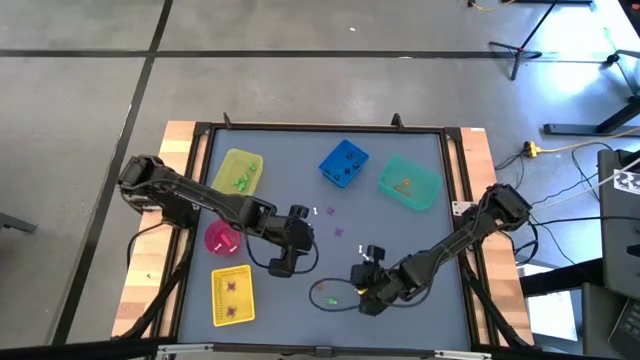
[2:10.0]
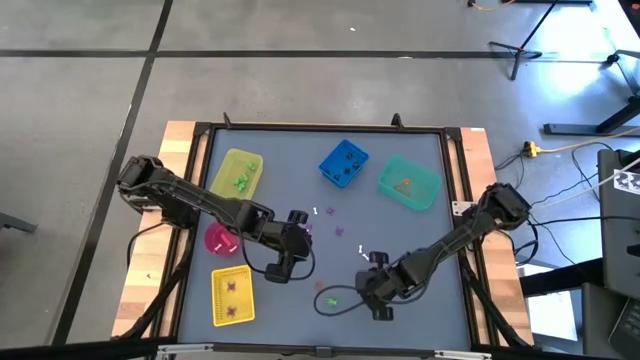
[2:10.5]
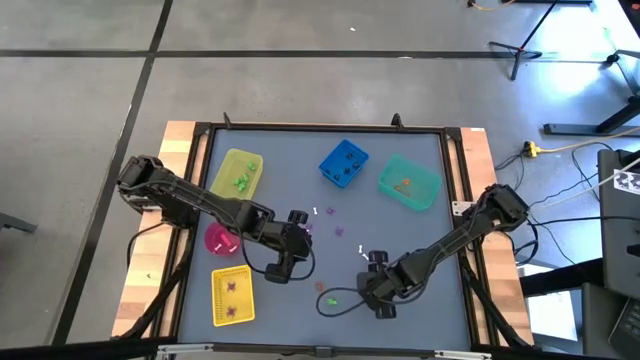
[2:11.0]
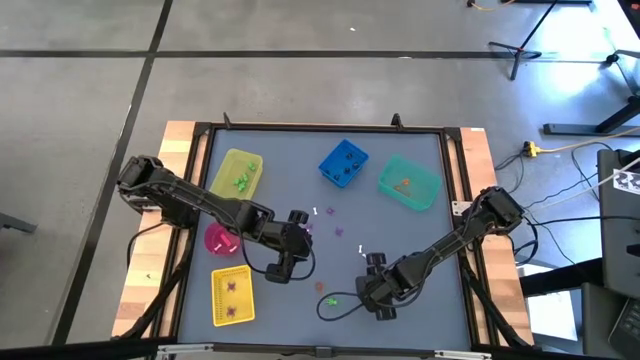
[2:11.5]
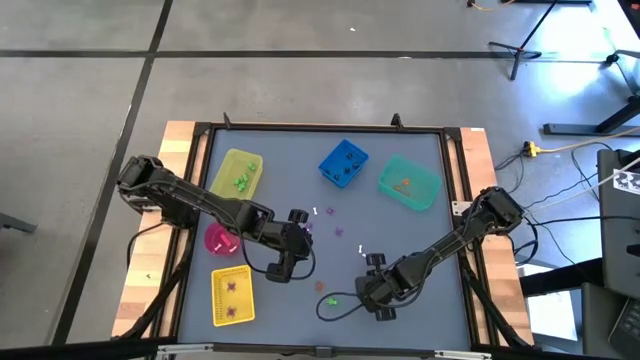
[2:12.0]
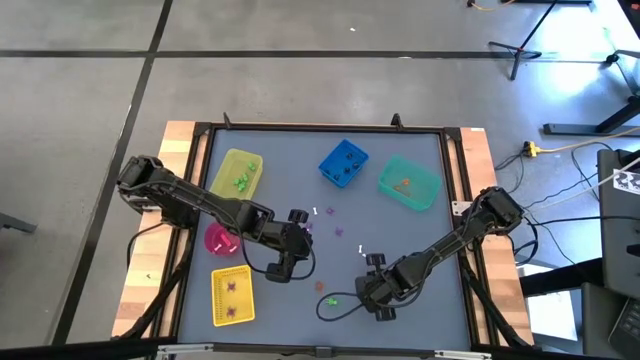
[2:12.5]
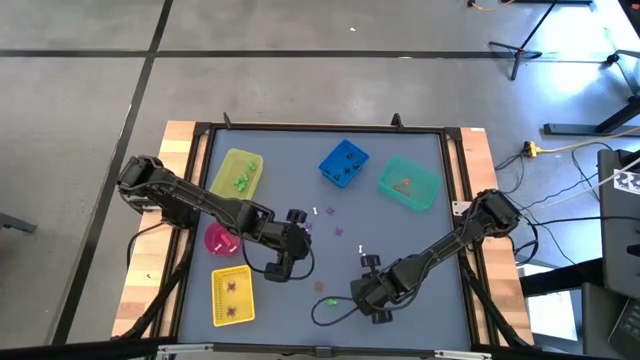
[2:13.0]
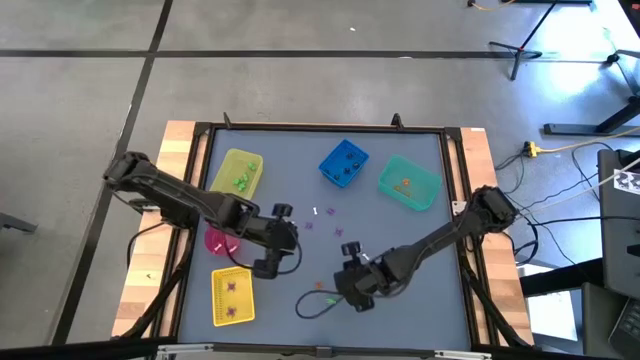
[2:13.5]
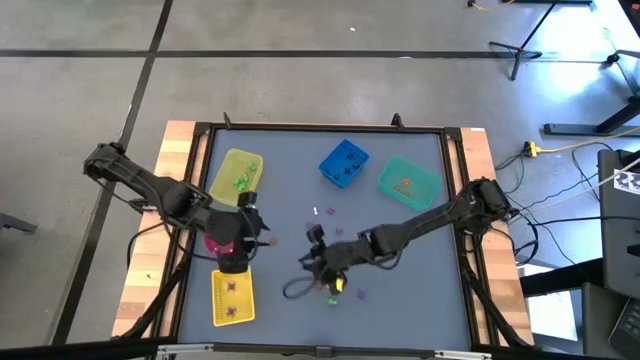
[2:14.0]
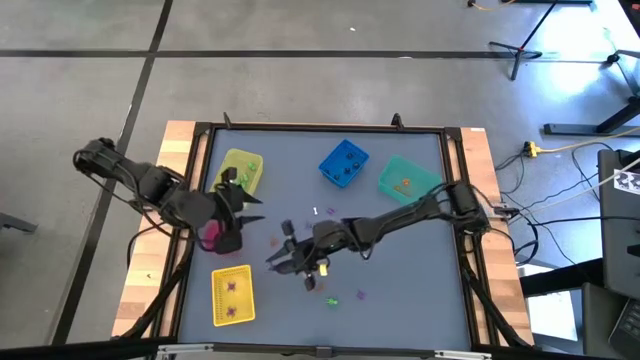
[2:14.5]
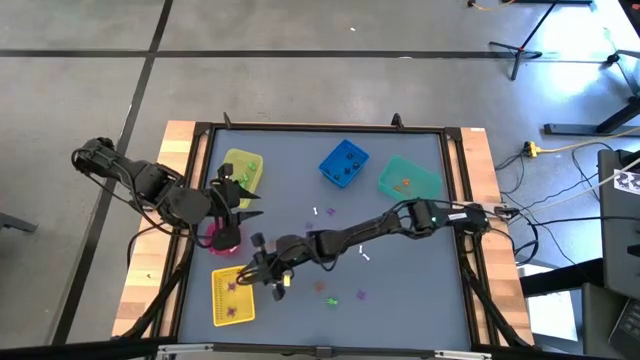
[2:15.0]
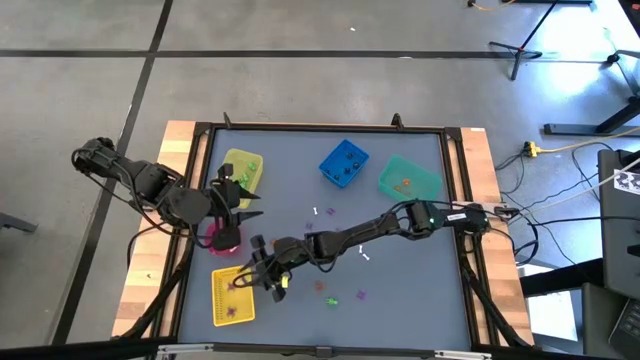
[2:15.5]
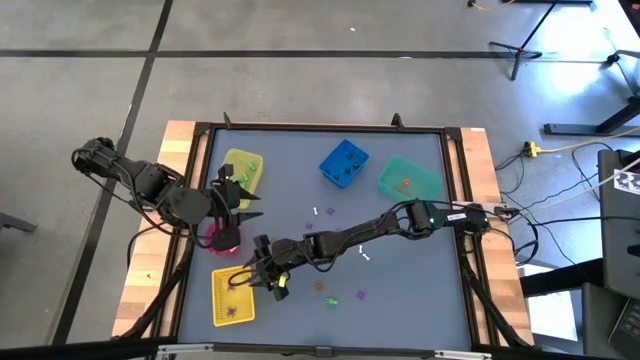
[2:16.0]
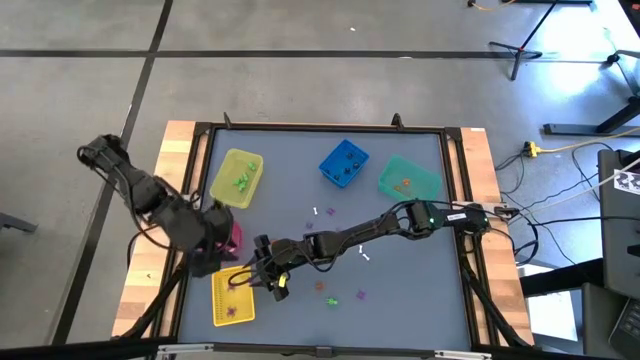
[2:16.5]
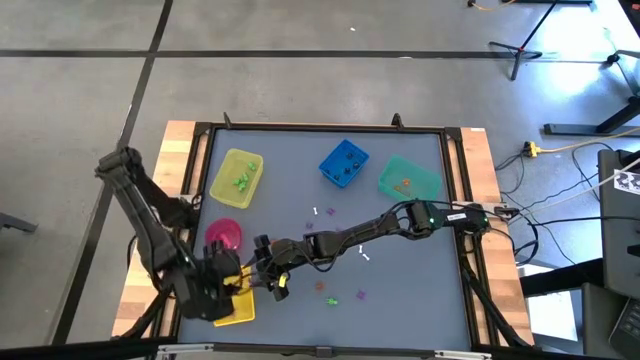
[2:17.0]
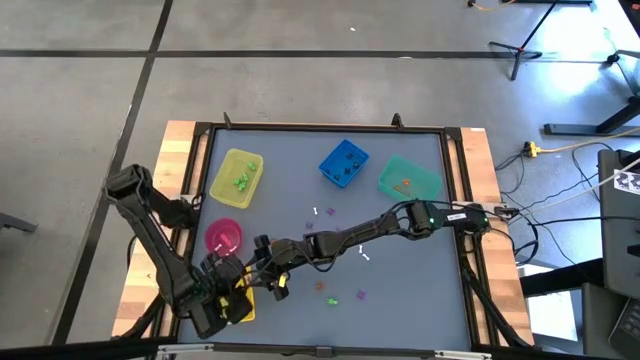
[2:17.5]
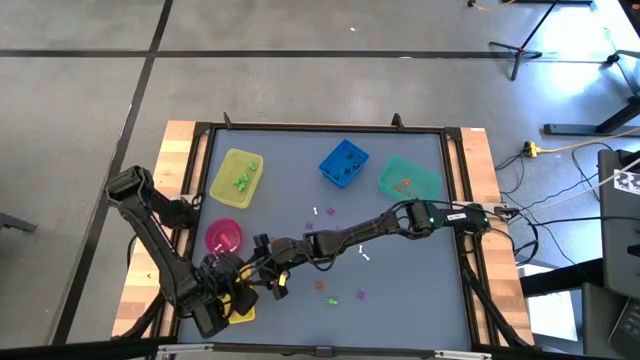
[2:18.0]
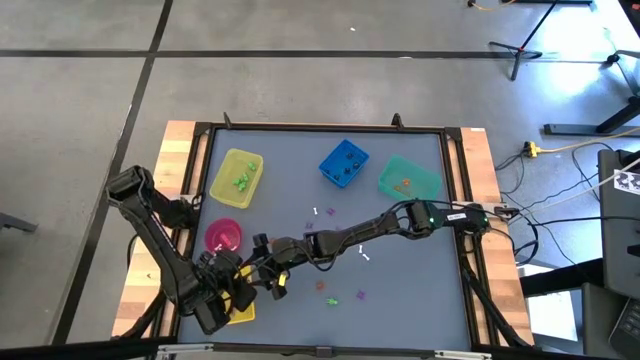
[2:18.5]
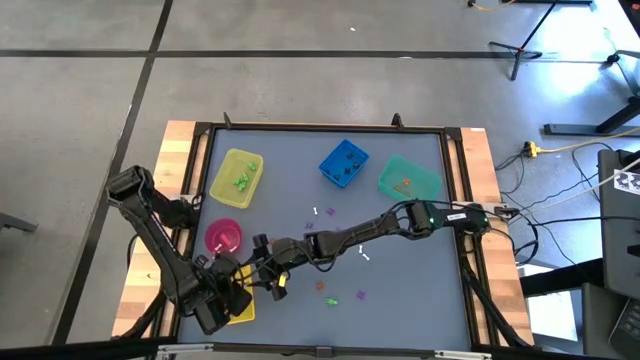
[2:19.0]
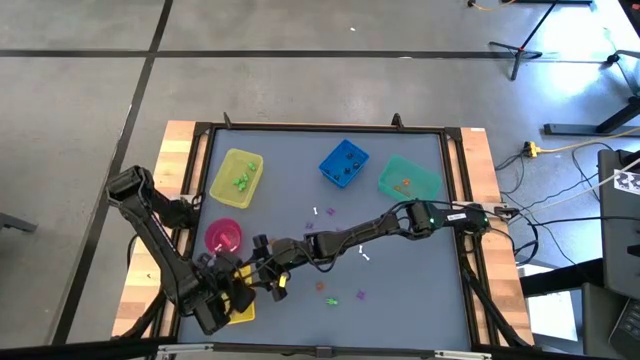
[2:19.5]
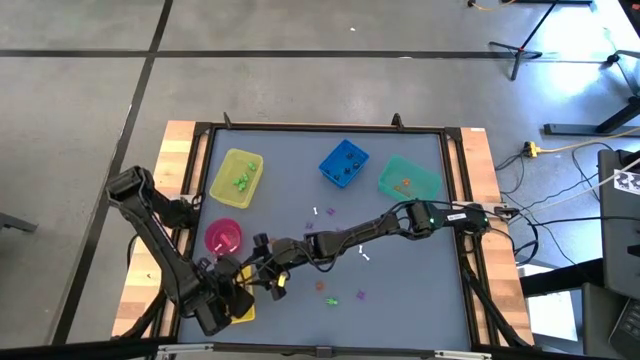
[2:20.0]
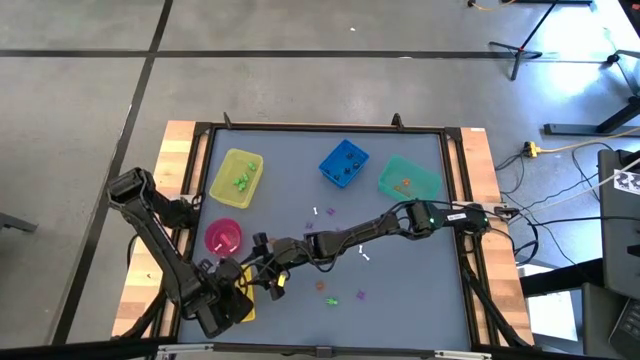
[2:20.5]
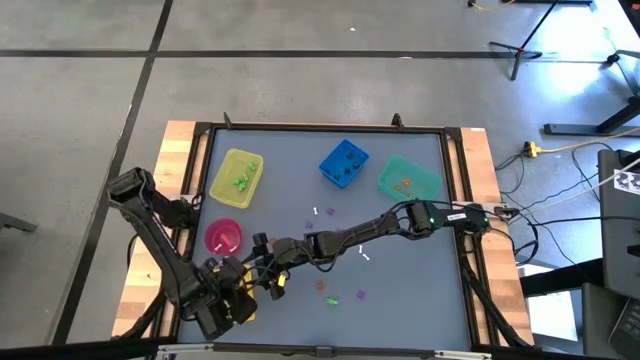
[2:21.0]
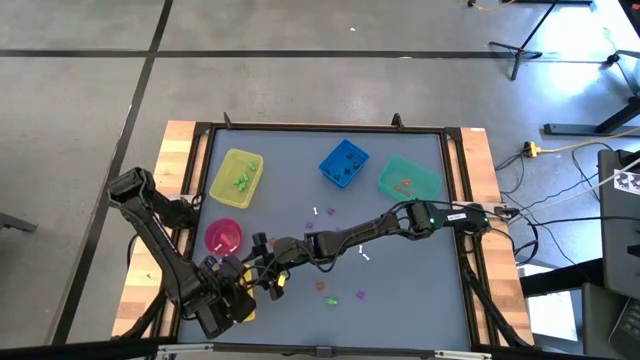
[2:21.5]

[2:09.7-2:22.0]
Task: Sort Halloween decoration
Put the purple spider toy into the yellow basket

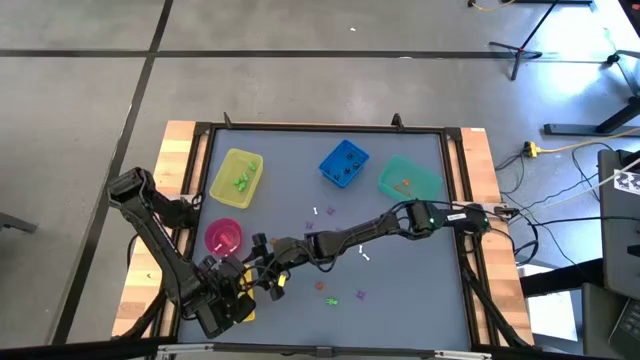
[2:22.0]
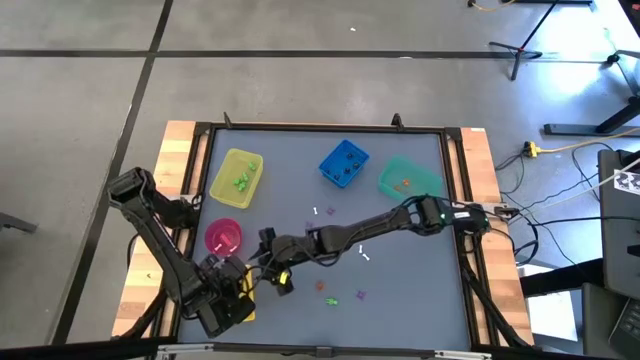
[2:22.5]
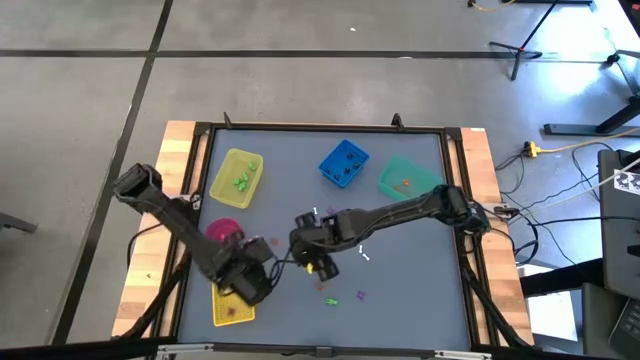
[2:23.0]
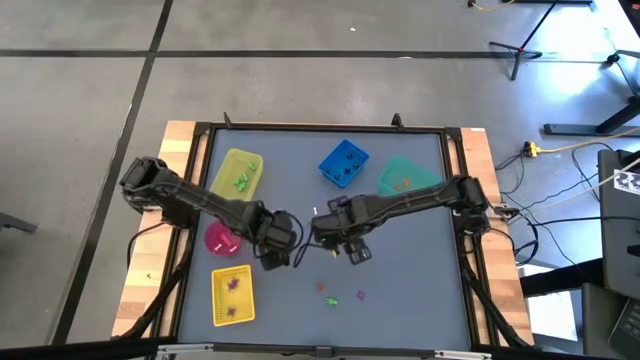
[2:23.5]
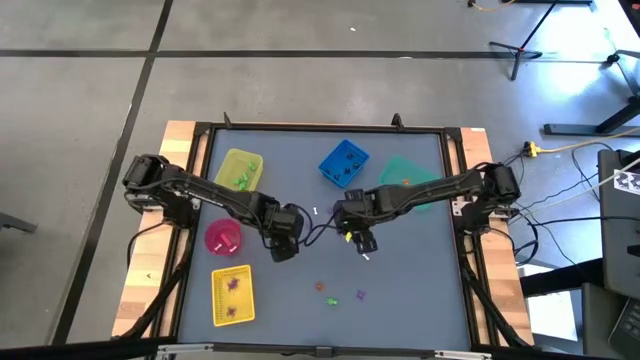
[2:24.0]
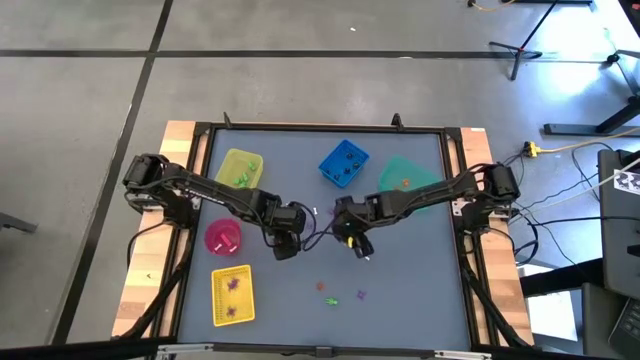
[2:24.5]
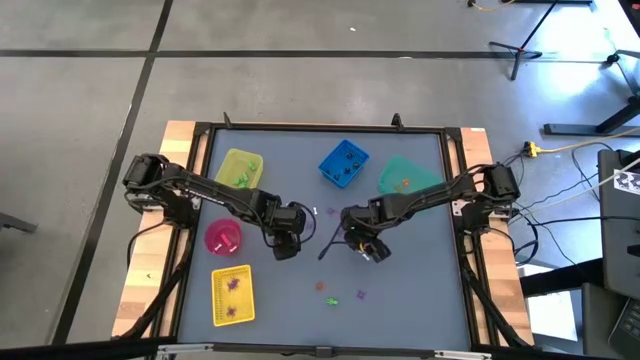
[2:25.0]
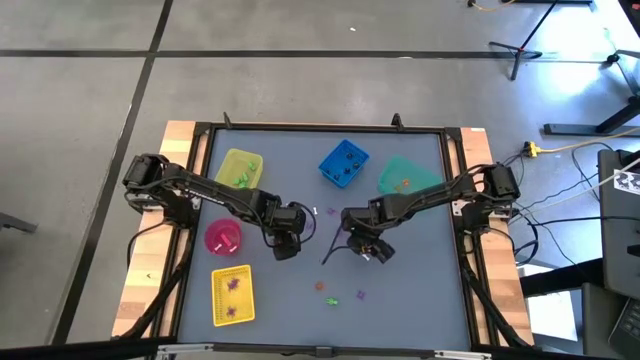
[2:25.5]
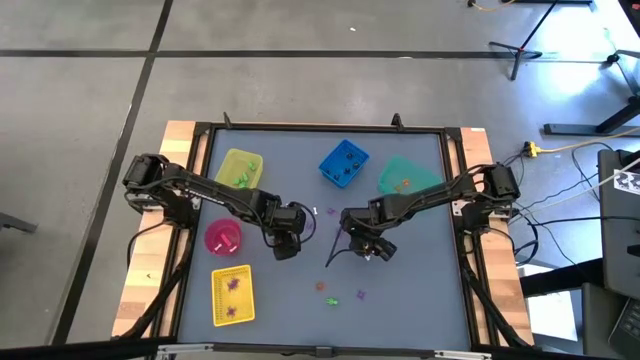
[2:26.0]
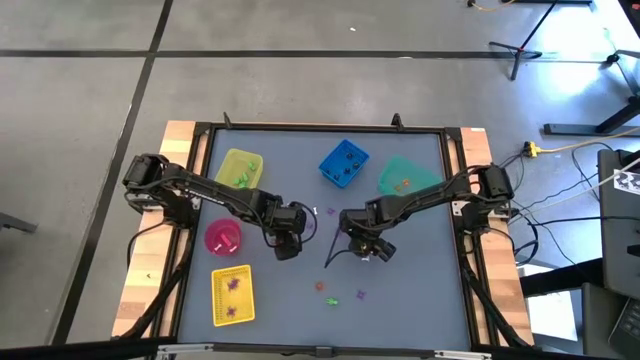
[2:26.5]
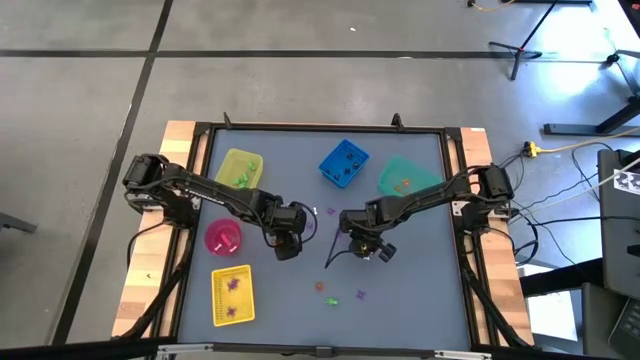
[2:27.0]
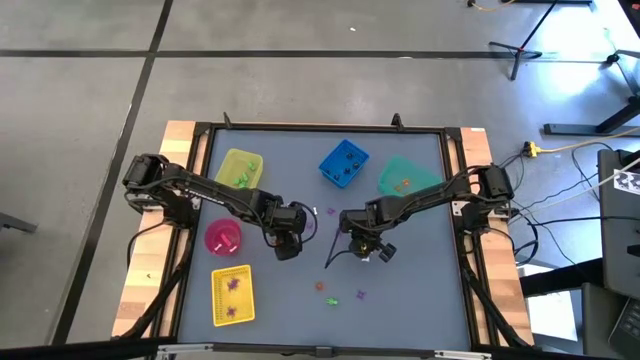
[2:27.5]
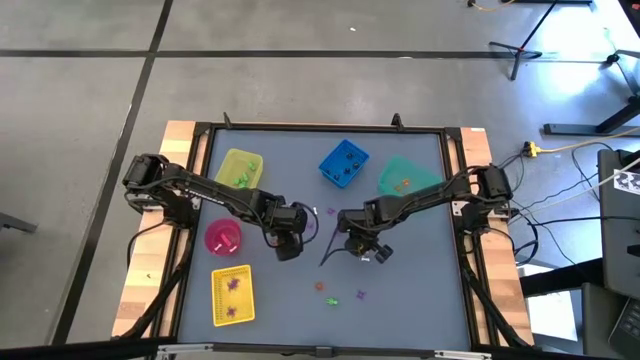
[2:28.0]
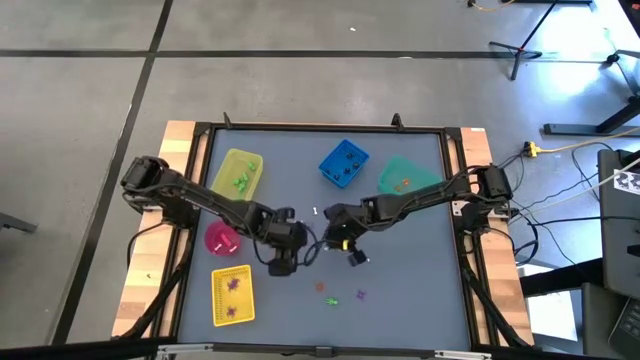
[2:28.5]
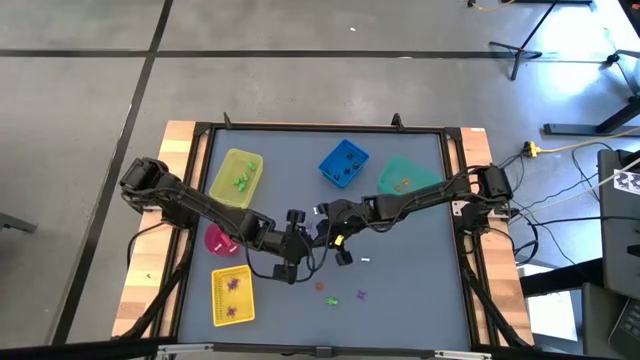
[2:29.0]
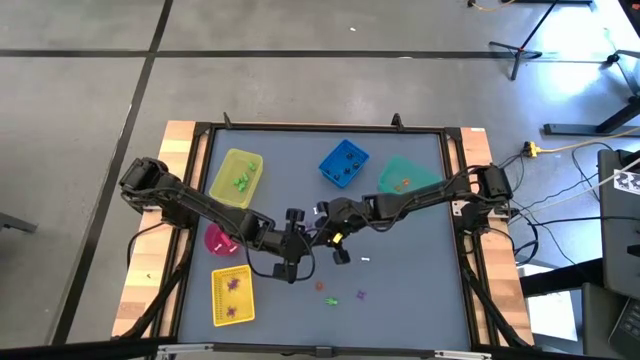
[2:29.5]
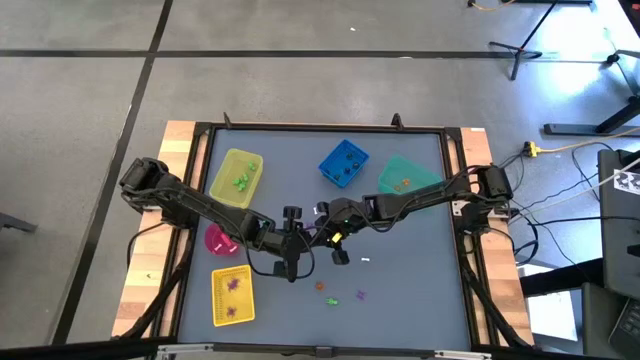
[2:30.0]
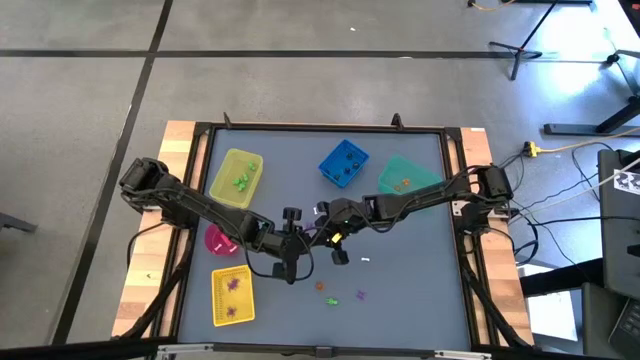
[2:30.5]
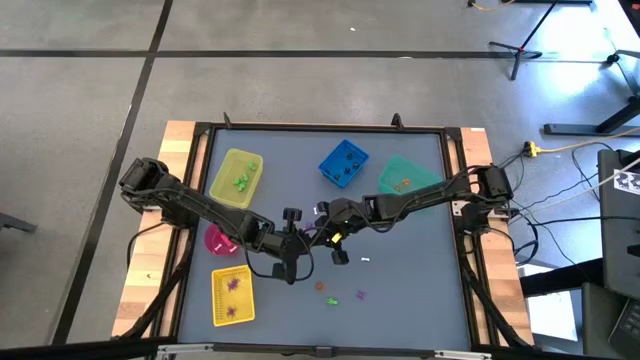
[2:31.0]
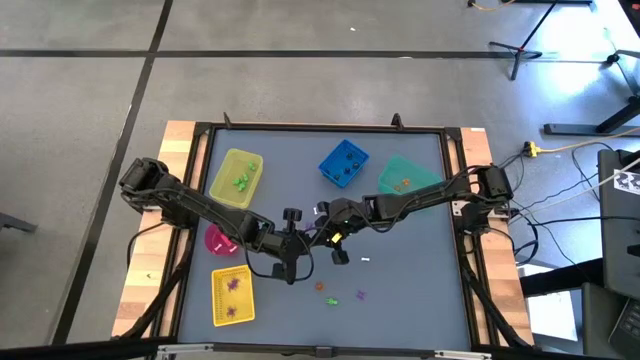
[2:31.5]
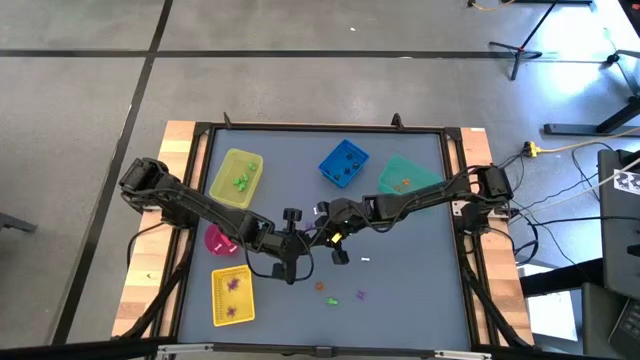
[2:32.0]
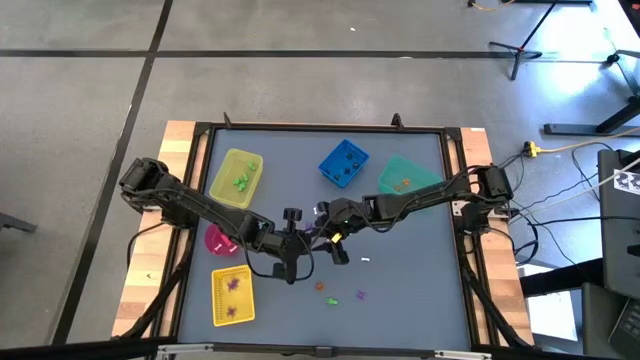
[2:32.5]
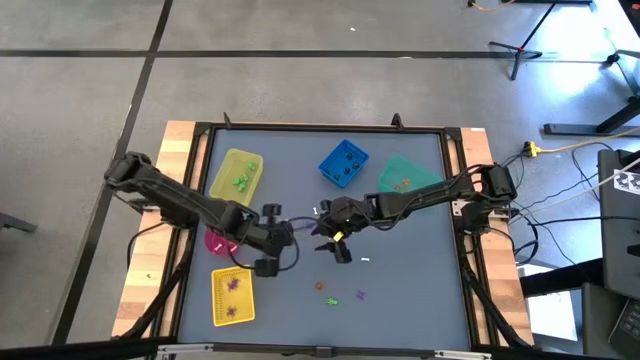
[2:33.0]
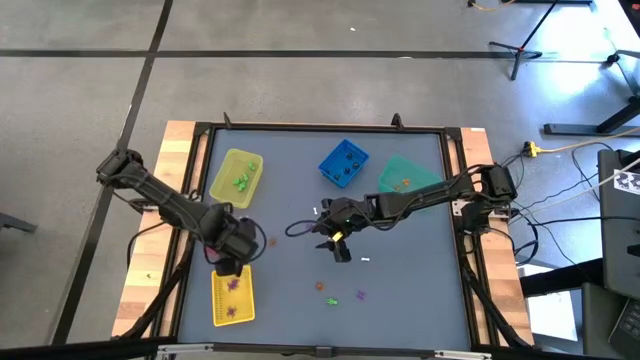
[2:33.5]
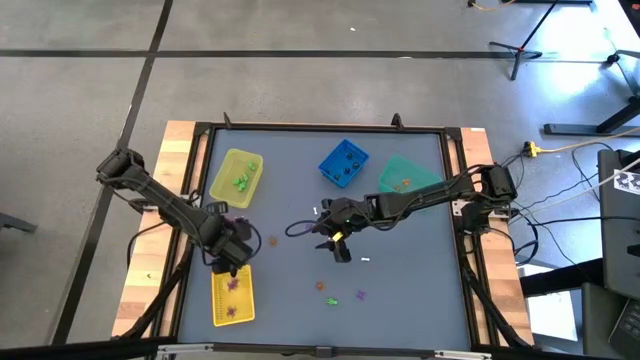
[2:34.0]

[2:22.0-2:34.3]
Put the white bone toy into the red bowl
